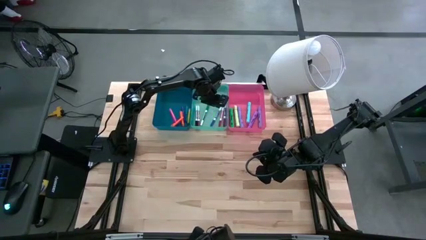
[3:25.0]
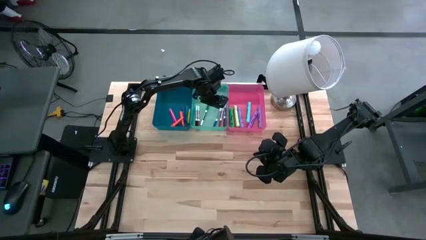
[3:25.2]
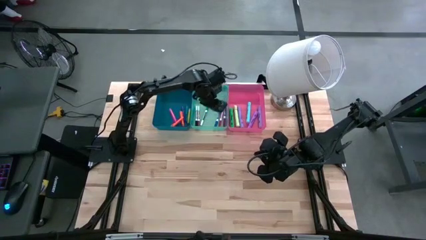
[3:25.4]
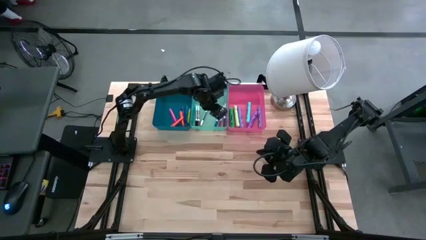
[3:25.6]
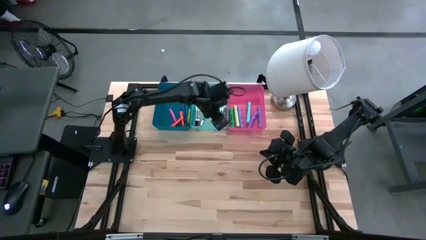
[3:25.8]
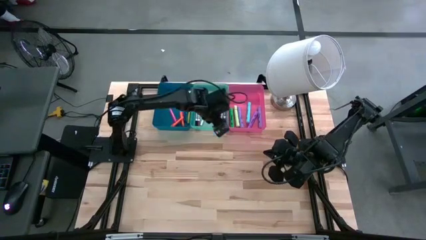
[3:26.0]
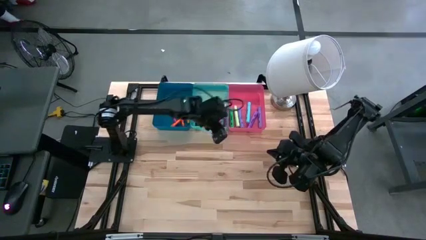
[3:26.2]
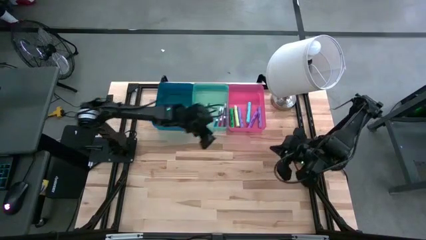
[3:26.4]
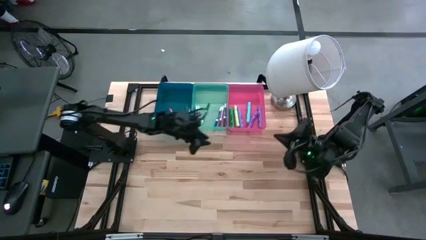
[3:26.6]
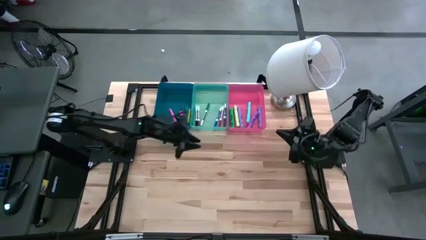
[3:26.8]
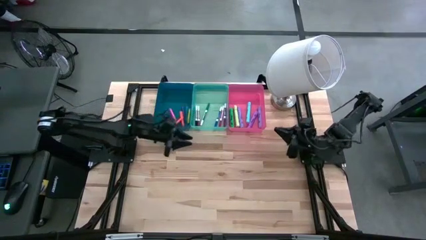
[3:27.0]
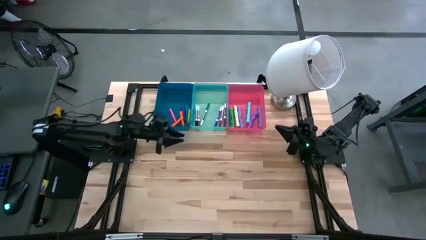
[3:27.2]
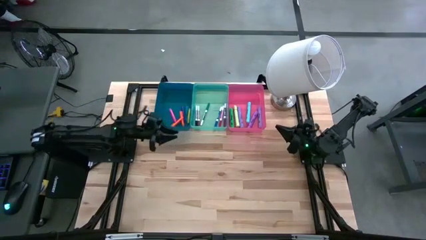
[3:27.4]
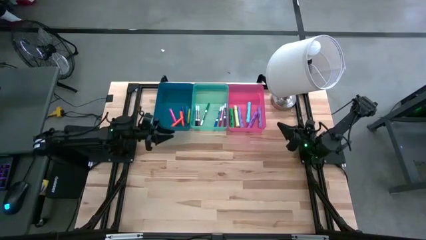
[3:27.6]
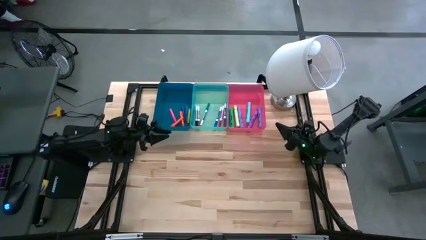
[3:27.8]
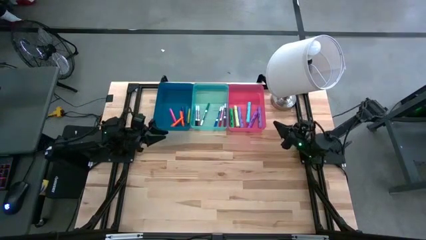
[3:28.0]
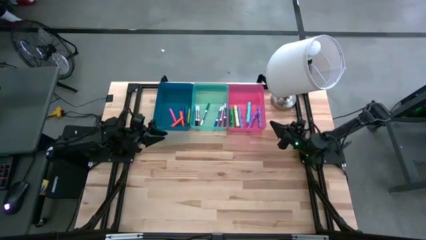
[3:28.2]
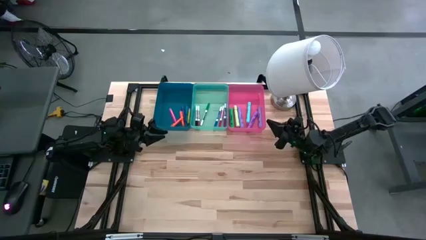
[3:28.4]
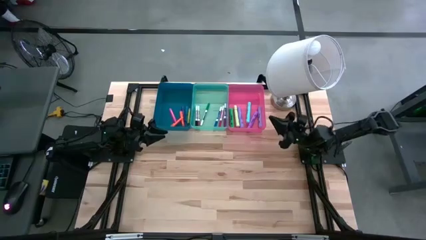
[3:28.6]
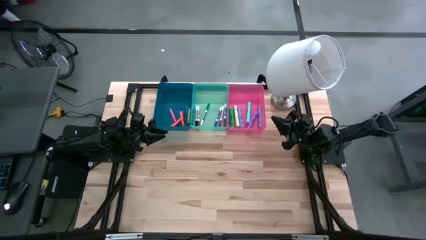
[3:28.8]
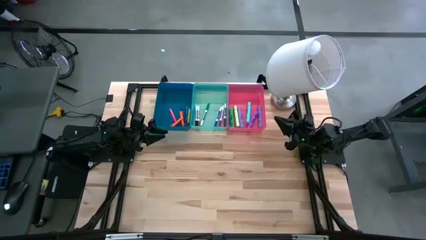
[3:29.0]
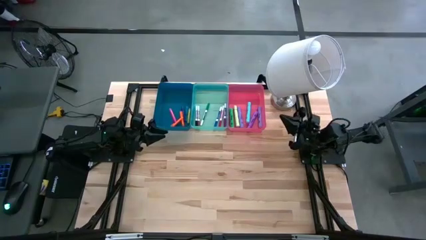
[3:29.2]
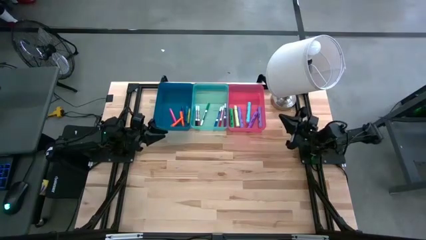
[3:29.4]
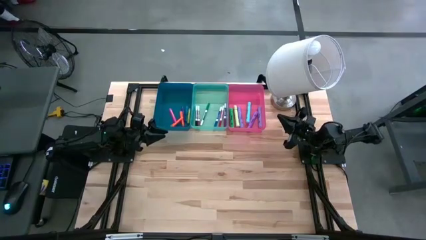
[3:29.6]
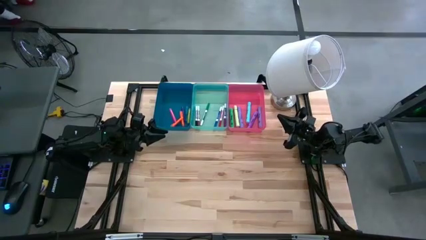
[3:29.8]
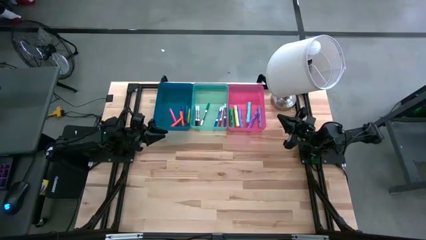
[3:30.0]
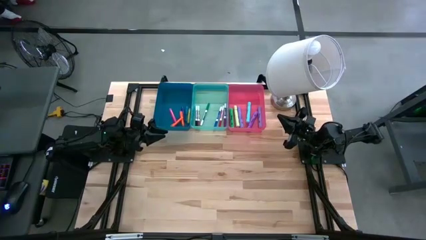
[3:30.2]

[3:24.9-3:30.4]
Task: Pick & Place Markers
Return to Home Position

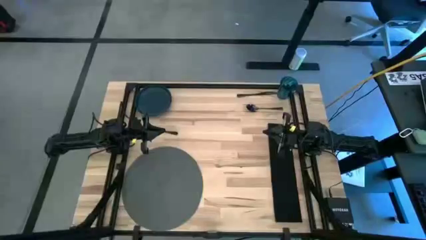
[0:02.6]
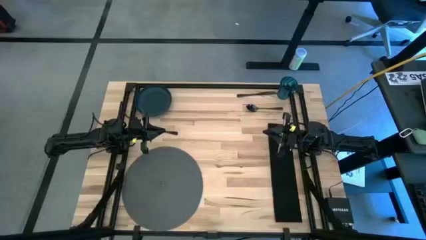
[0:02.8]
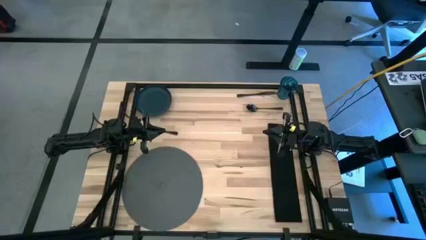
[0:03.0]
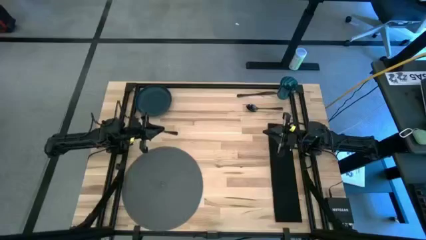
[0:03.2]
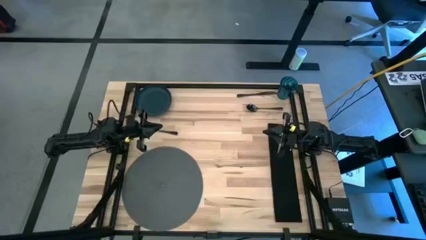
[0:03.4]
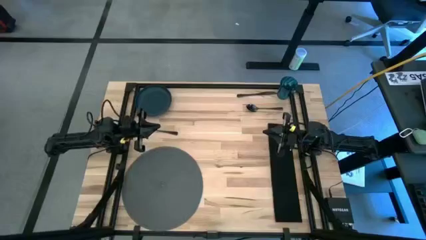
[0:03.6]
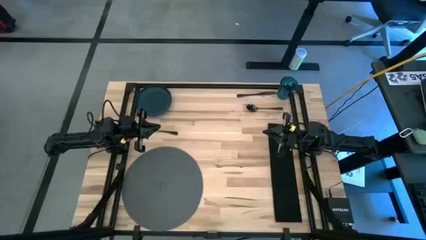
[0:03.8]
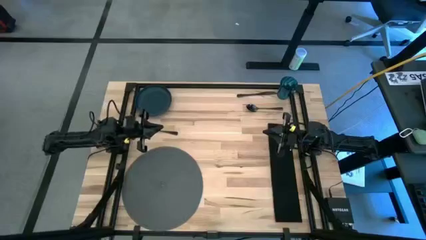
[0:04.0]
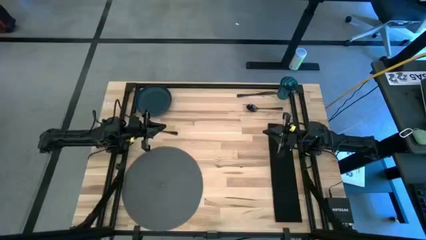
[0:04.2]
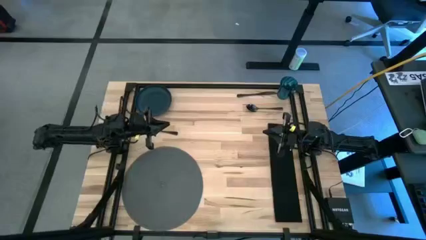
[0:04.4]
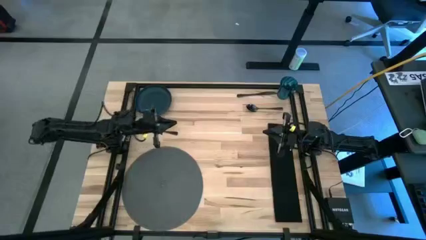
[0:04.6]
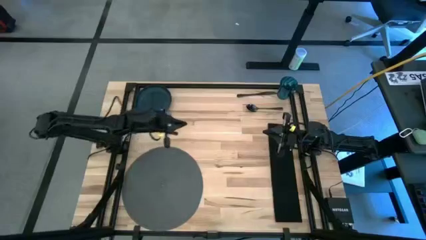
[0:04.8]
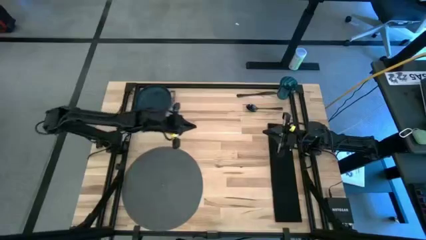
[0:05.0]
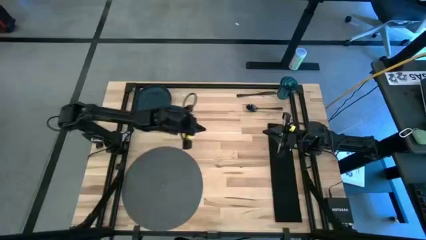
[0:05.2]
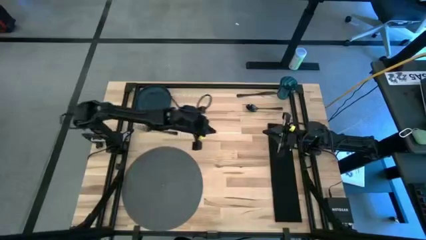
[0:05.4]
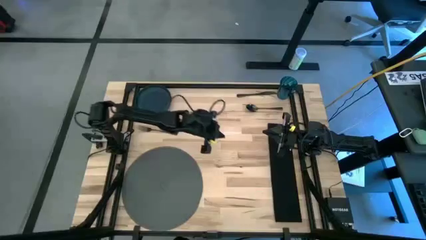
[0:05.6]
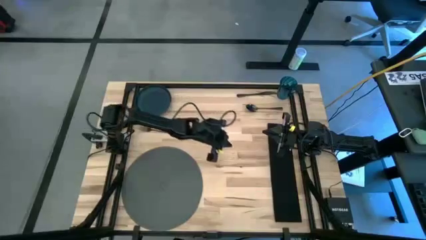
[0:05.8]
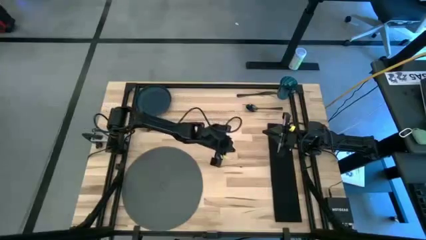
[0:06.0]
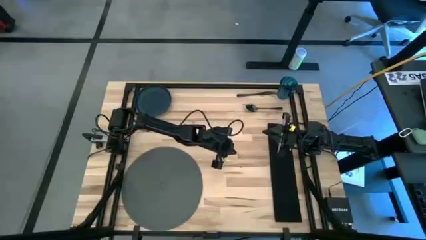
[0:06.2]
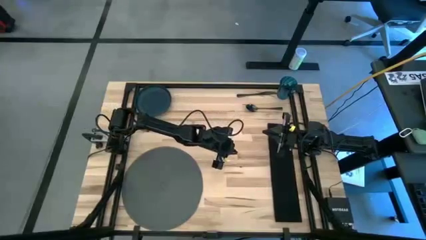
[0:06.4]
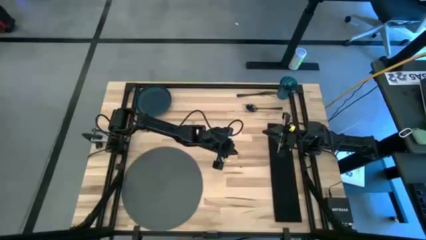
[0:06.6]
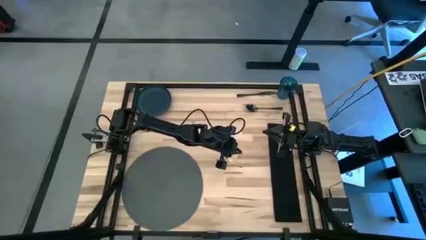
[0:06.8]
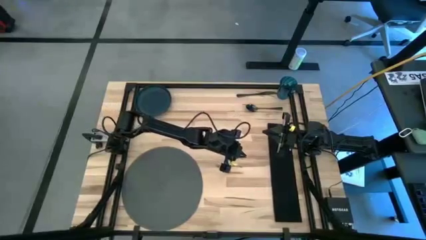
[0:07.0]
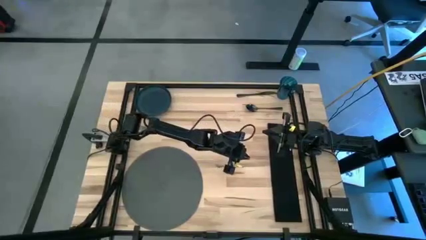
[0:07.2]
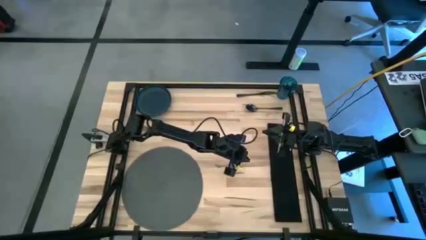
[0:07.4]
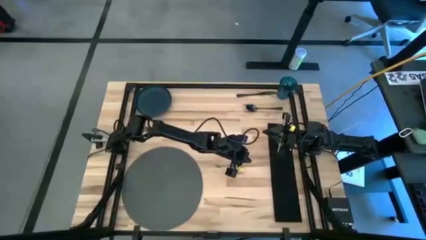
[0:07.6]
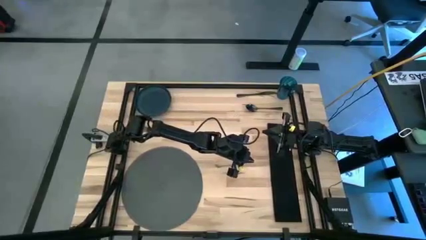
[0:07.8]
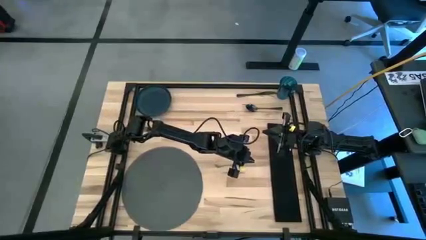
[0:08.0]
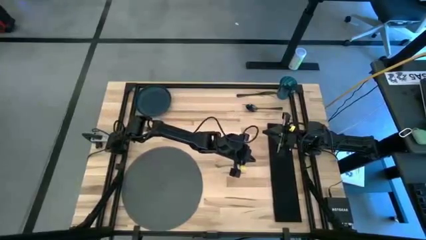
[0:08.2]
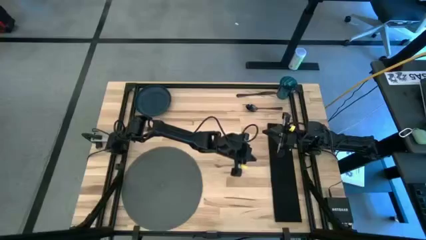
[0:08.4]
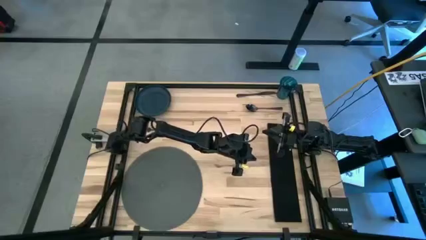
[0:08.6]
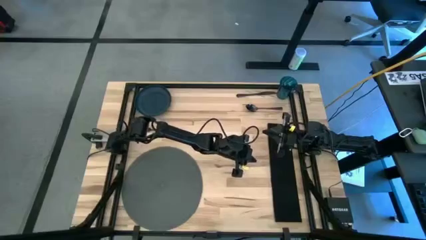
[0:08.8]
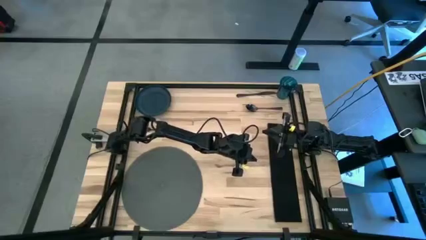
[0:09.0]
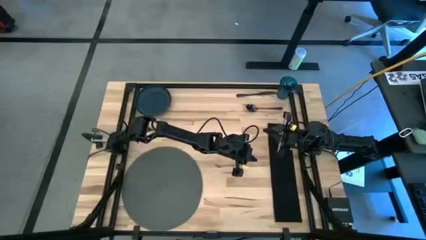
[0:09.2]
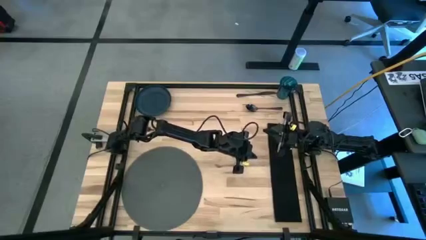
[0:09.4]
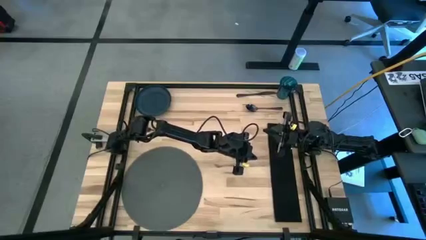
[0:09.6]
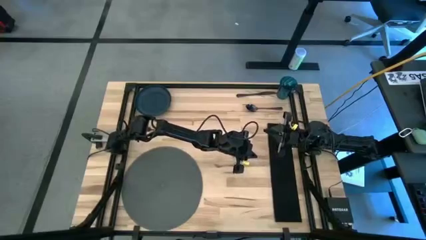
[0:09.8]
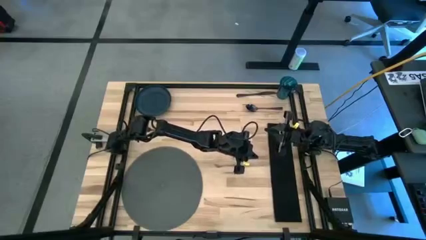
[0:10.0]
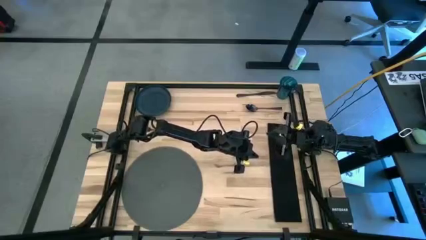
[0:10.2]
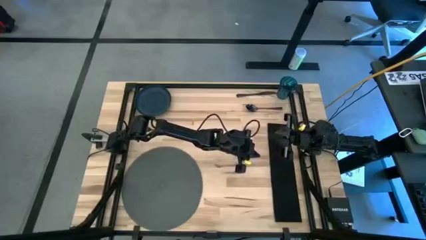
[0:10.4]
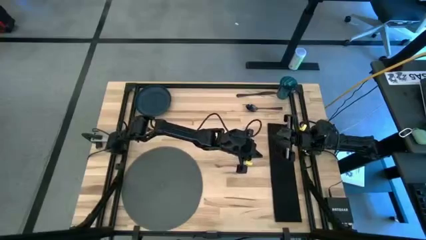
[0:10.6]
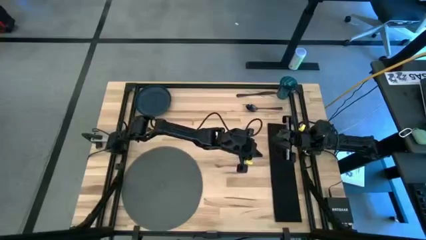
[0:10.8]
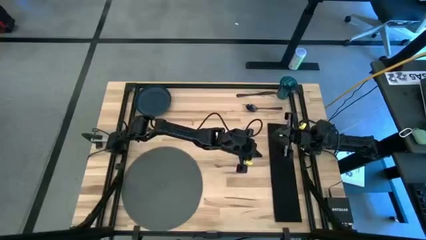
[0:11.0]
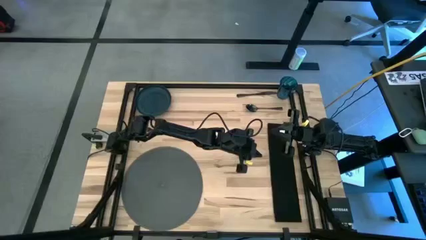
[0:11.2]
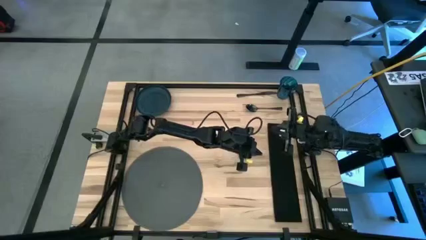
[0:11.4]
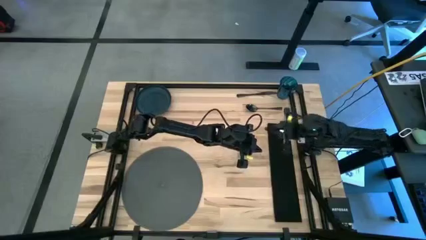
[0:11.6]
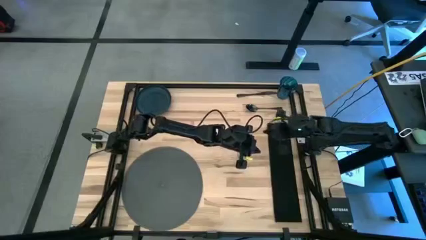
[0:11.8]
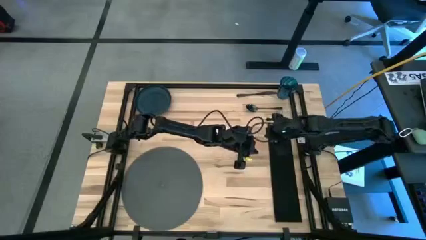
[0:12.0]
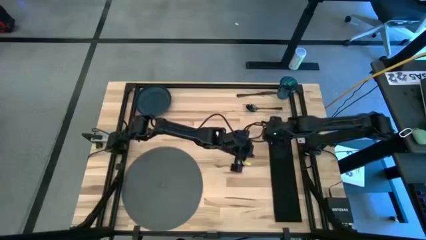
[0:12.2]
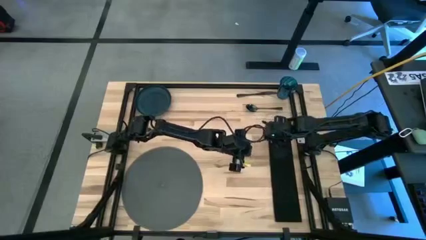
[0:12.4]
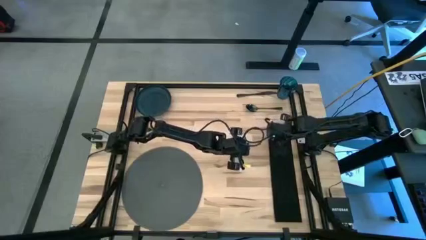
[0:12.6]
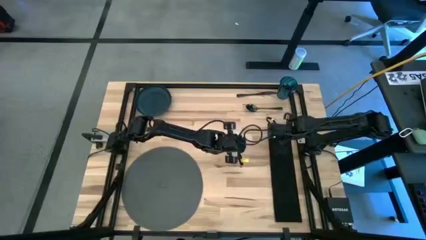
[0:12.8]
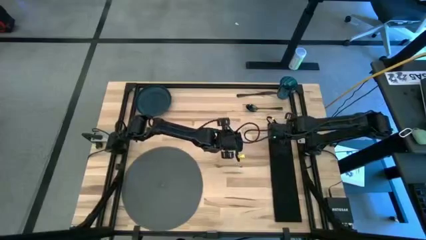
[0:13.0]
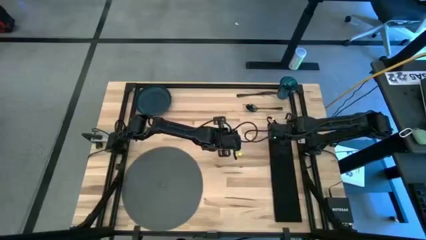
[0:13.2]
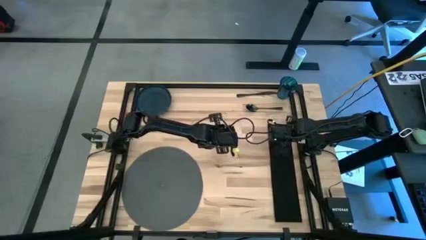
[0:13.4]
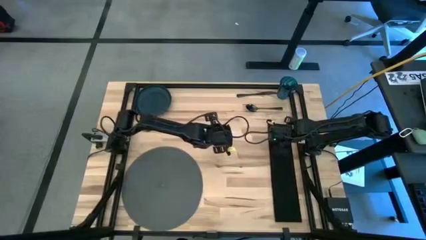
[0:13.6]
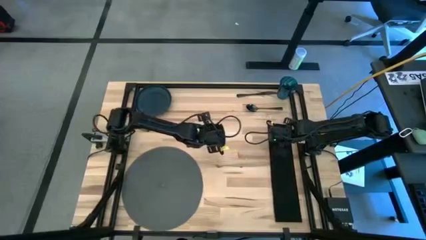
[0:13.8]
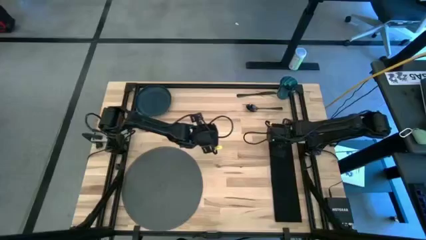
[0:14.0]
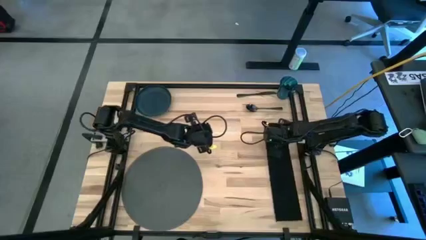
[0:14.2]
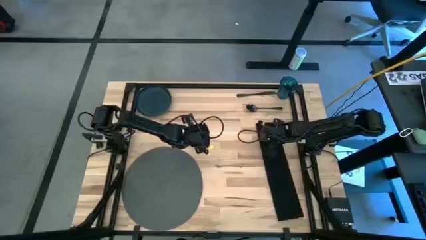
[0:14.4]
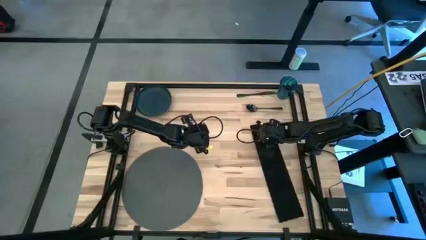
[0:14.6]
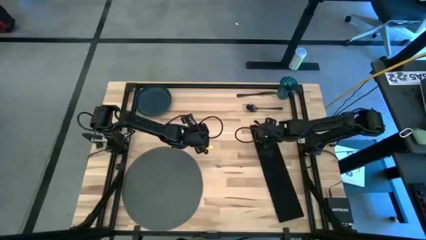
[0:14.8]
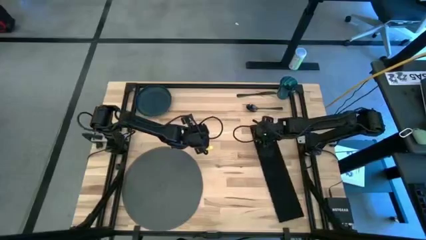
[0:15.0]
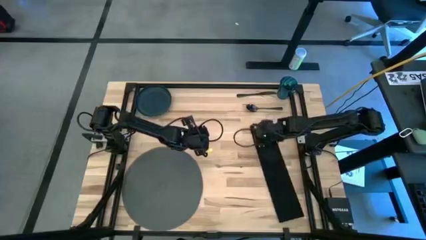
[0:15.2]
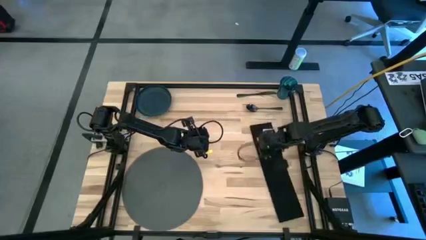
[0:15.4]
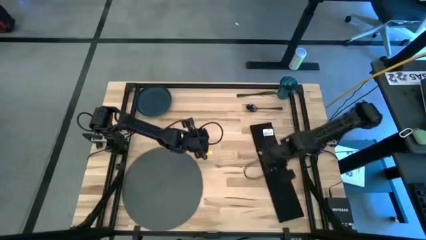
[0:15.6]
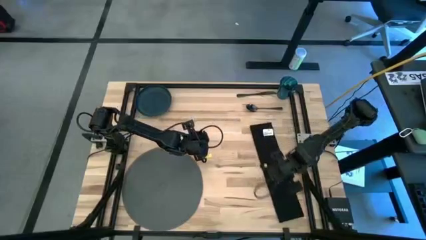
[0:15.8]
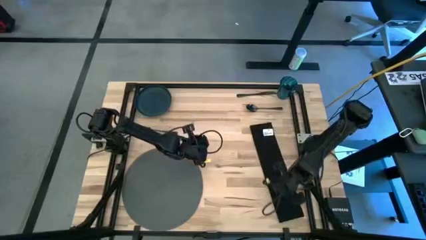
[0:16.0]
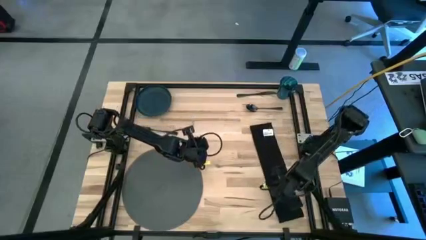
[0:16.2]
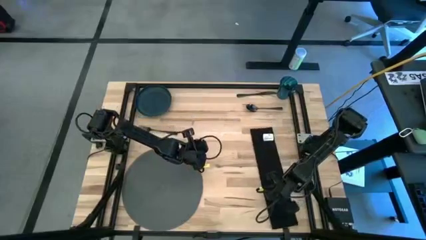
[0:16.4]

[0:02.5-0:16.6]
Task: Set table place
Fold the black table napkin
